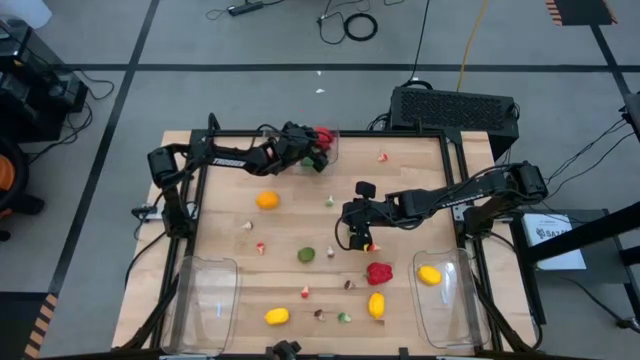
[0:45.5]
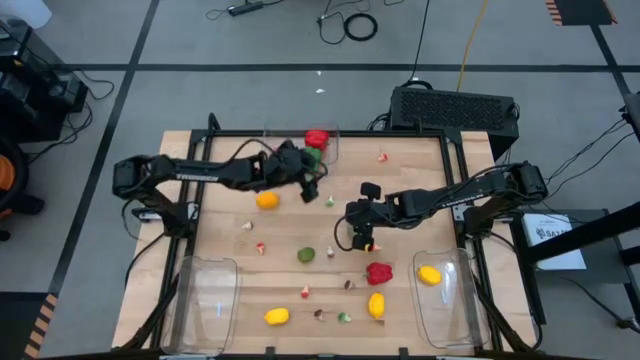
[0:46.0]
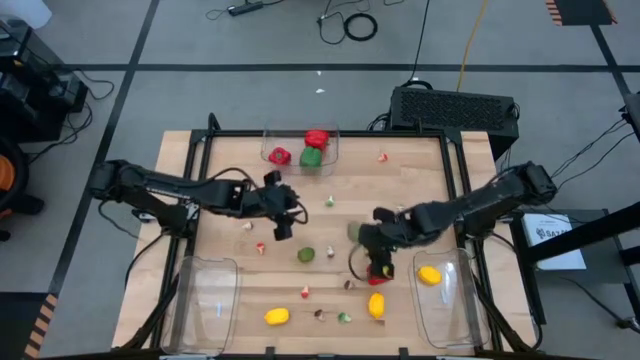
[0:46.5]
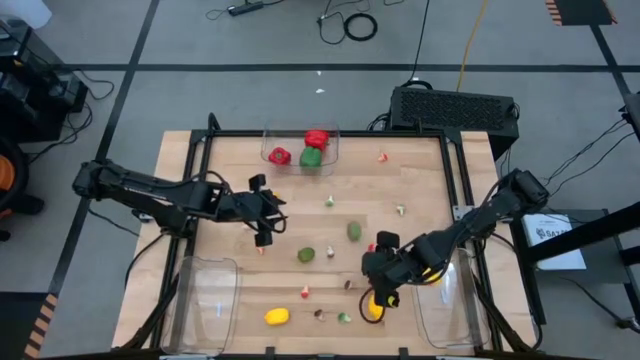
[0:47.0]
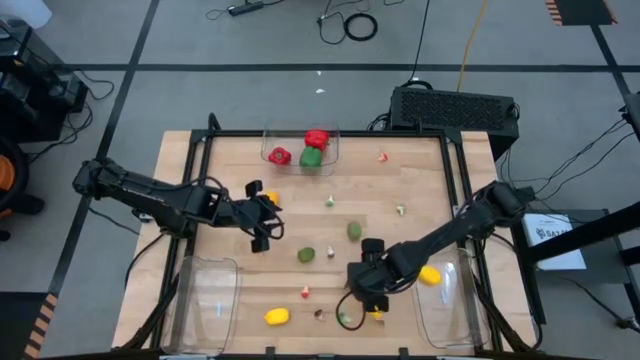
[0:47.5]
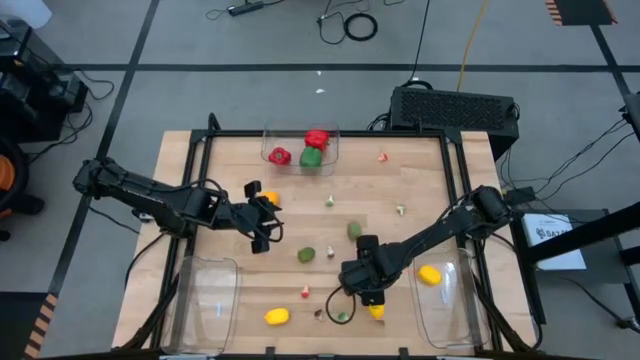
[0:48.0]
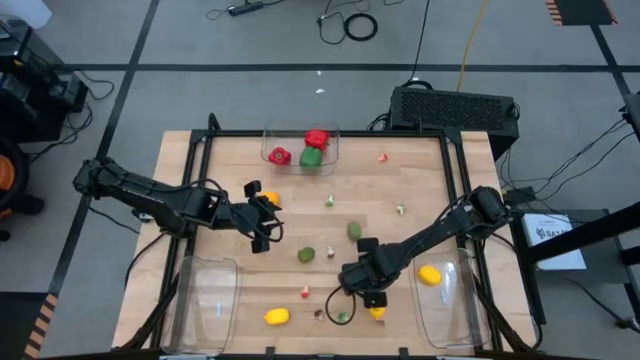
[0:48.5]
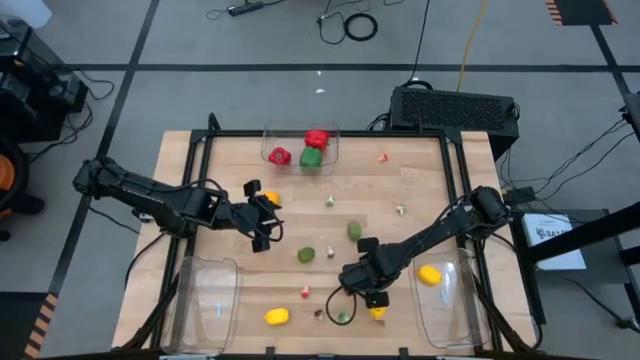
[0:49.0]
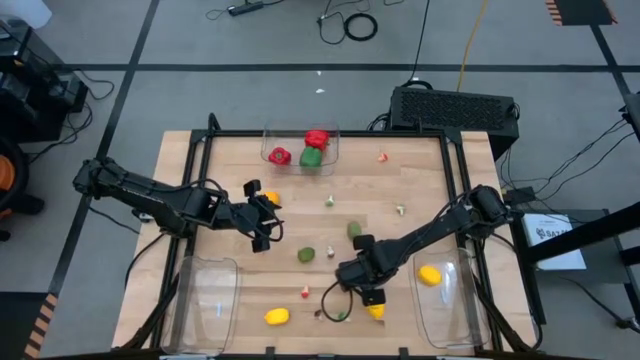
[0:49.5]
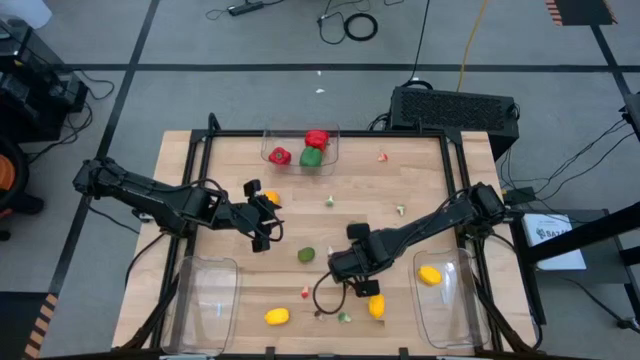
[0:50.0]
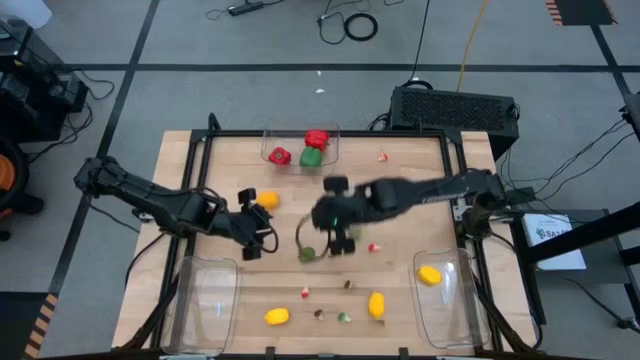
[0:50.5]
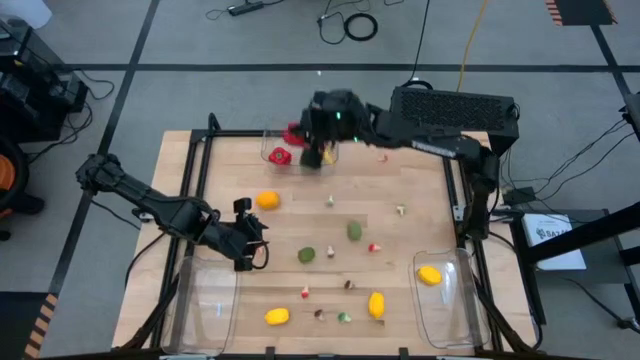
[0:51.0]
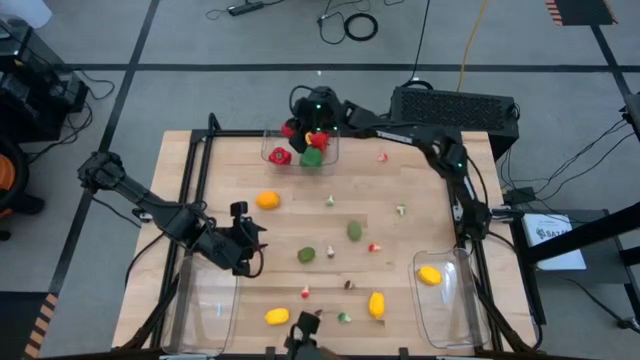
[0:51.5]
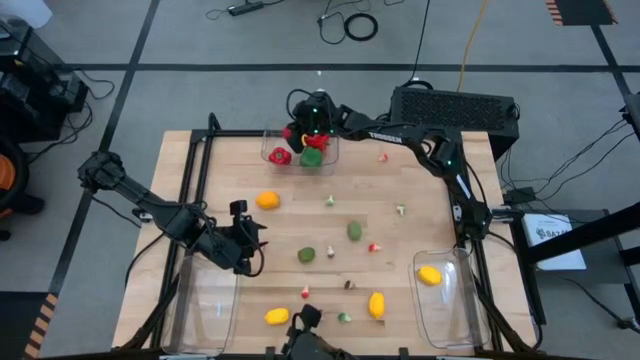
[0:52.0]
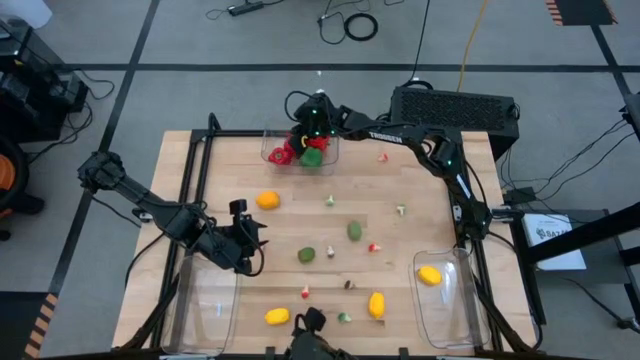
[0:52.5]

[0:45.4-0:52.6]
Task: Sort produce into baskets
Put the red bell pepper into the top transparent bin

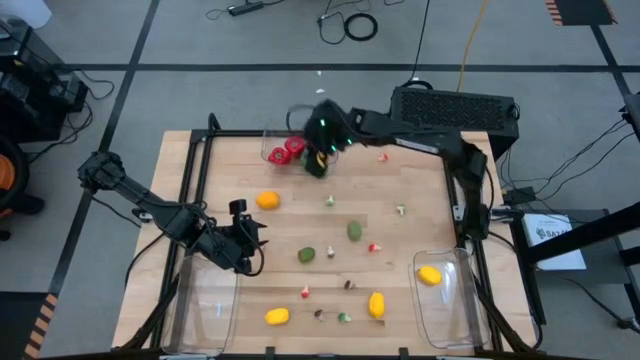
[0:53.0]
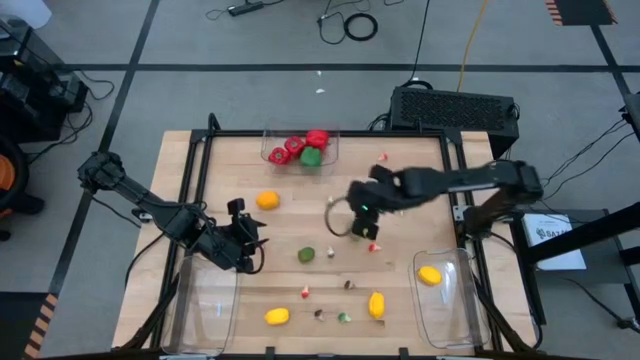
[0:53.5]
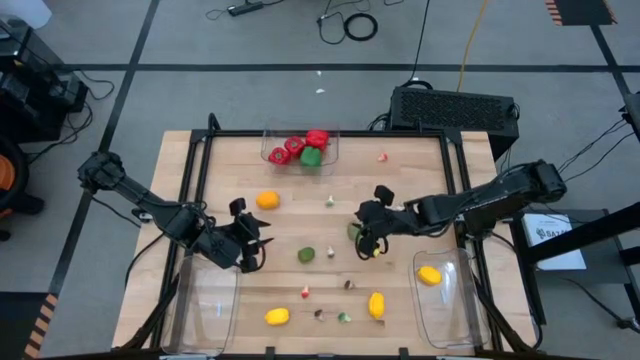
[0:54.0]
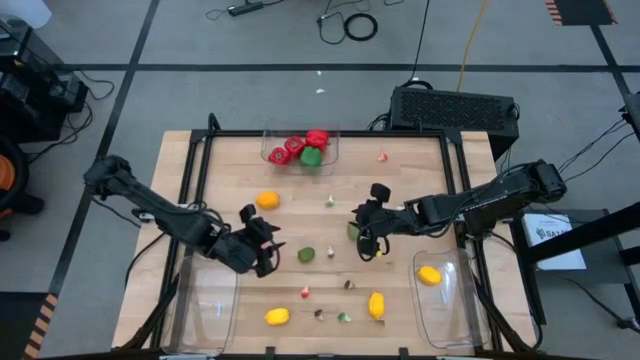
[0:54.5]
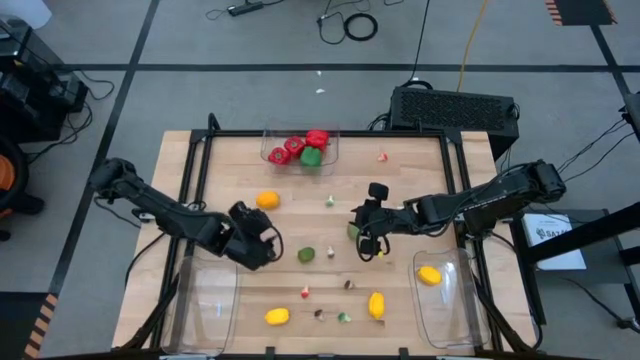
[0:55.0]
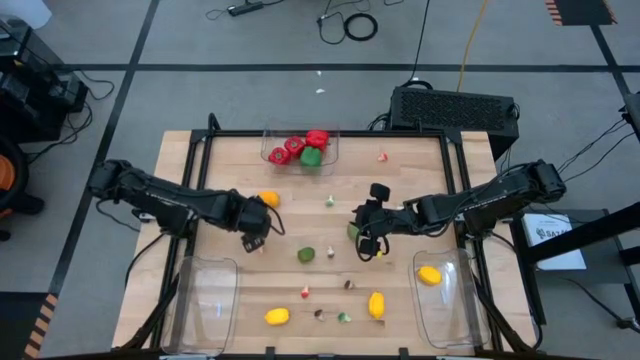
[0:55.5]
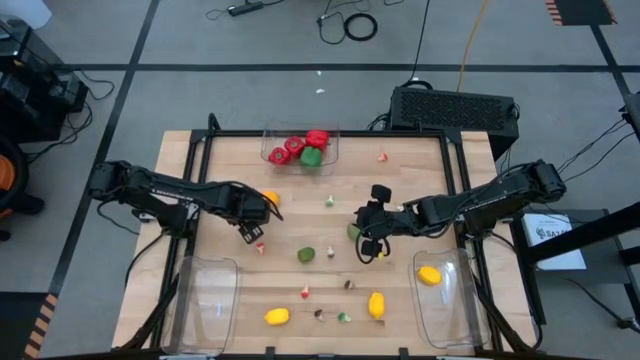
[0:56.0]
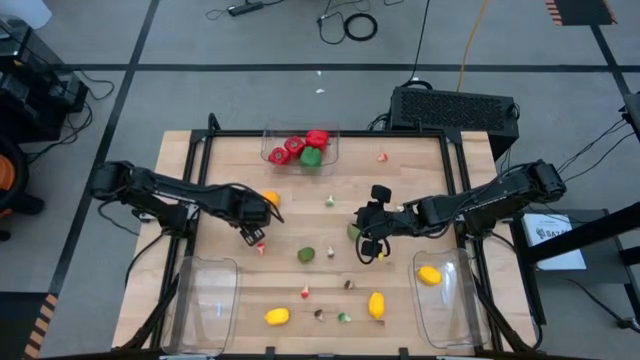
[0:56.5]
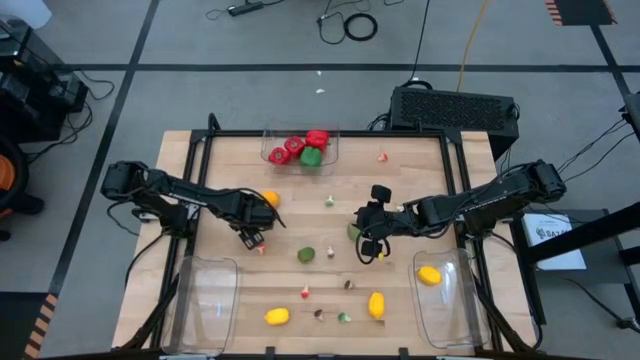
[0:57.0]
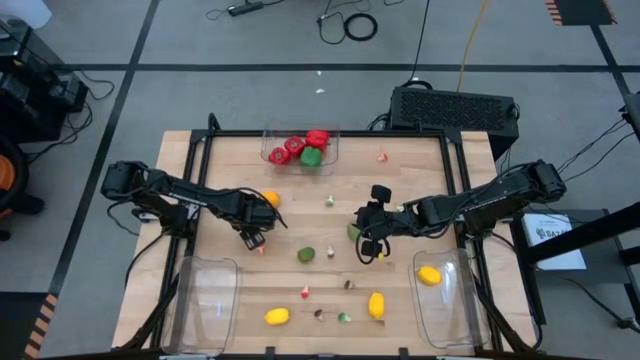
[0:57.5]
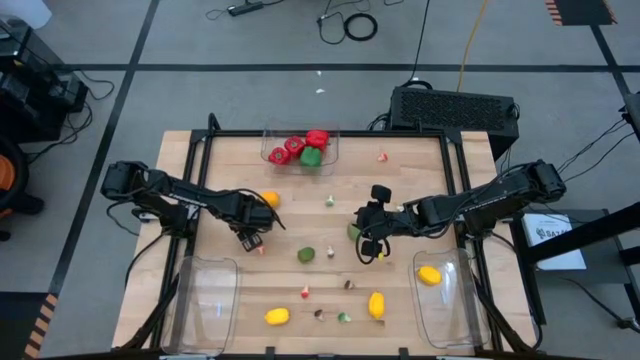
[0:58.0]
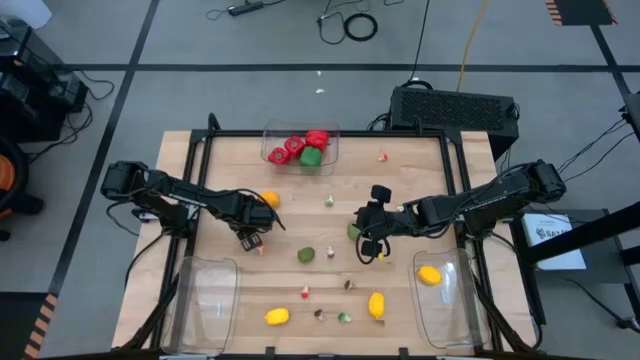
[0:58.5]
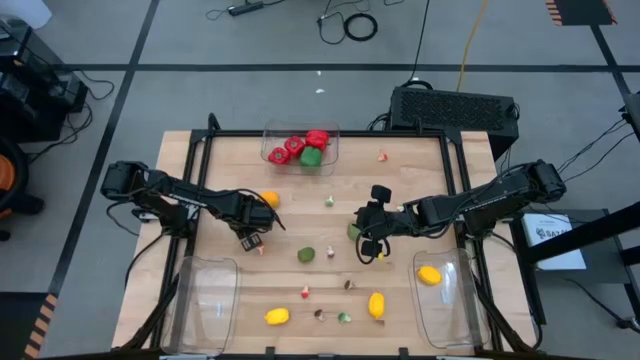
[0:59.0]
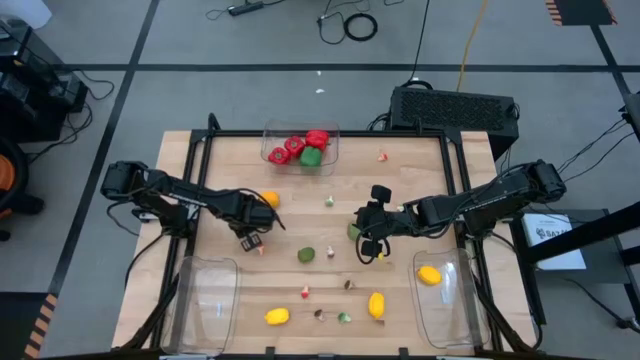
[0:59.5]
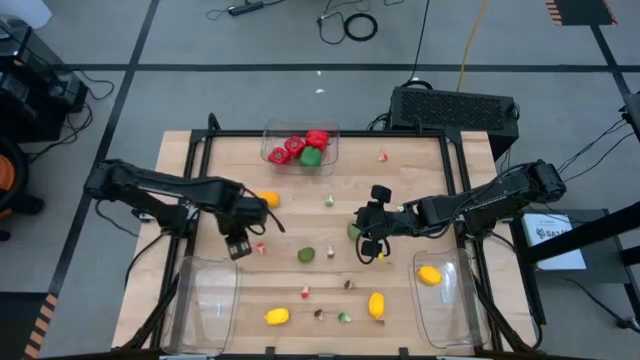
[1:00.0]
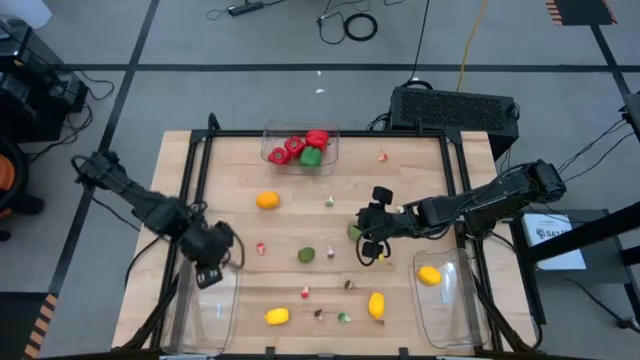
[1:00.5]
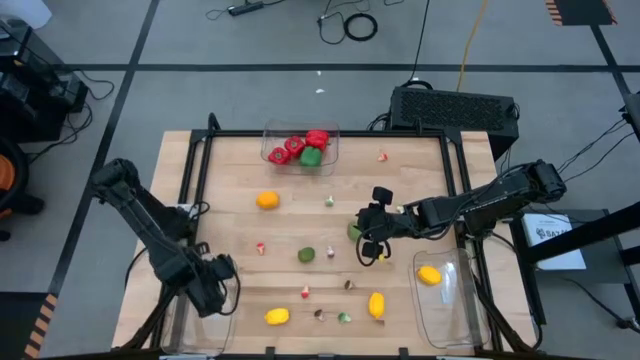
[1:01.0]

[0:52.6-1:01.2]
Put the brown mushroom into the bottom left transparent bin

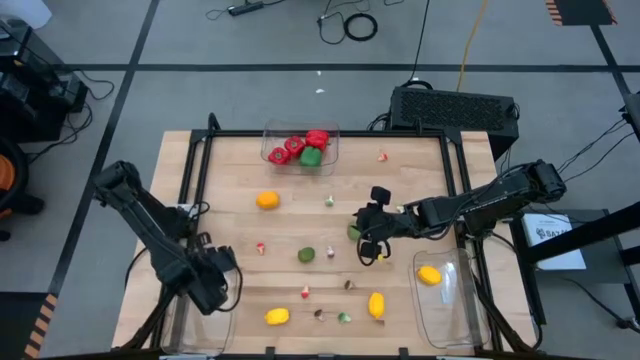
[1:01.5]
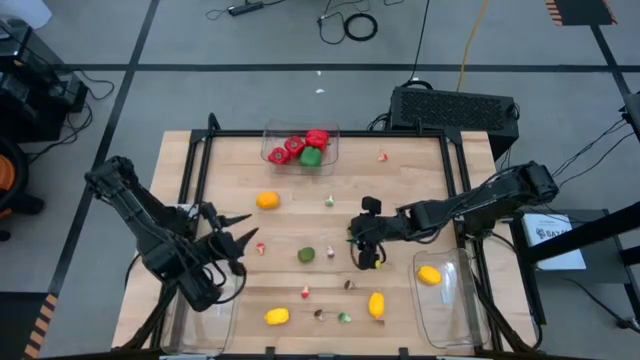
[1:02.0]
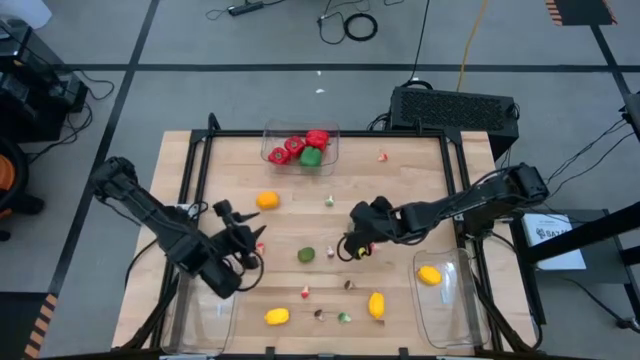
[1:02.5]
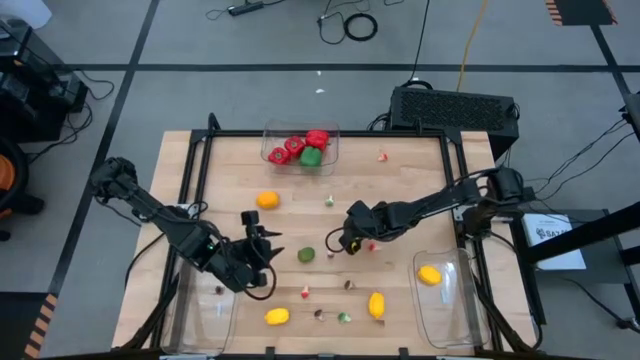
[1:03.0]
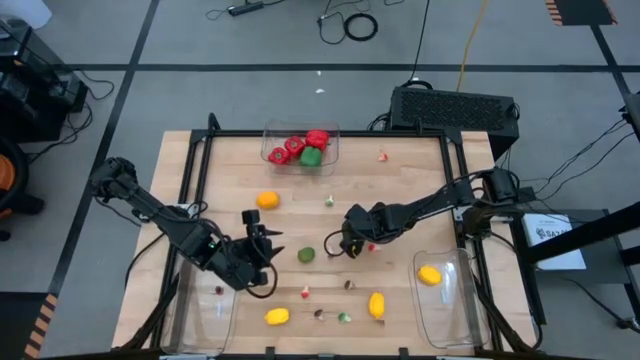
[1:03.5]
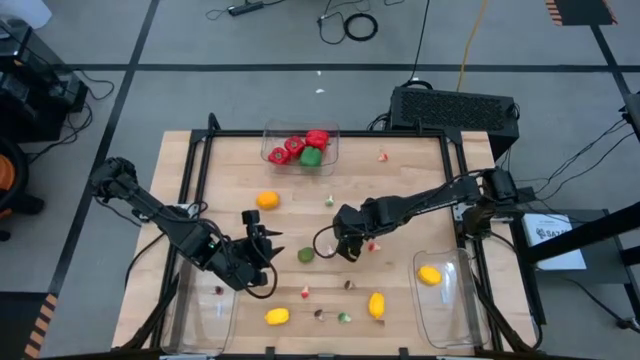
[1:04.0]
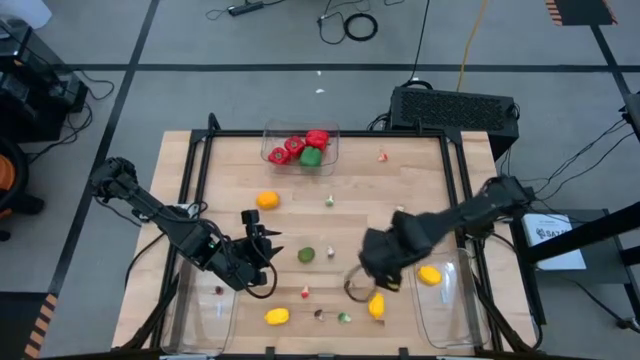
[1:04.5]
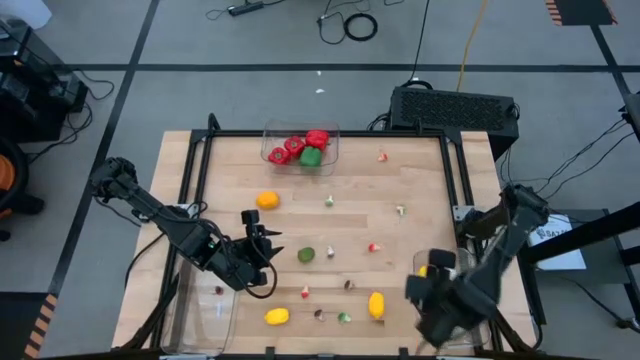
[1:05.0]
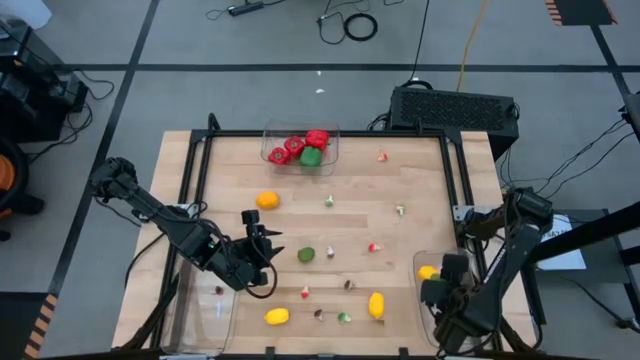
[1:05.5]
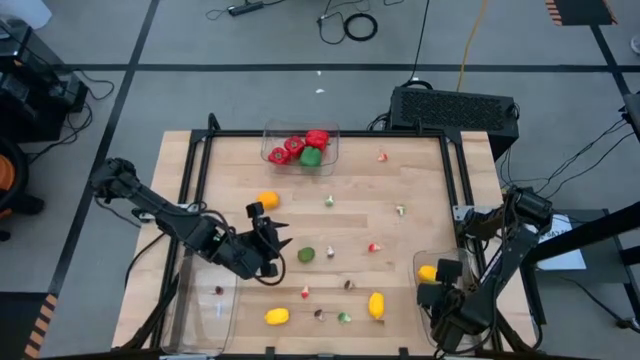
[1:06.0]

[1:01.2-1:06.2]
Put the green lime into the bottom right transparent bin

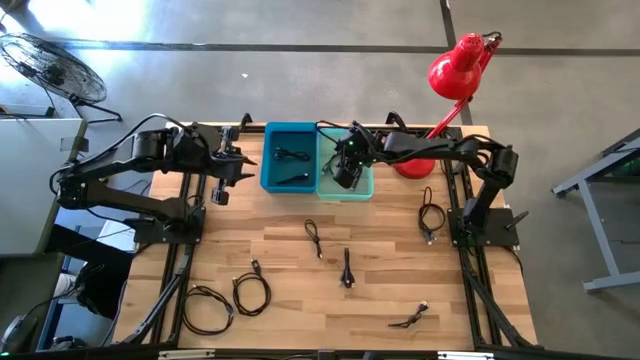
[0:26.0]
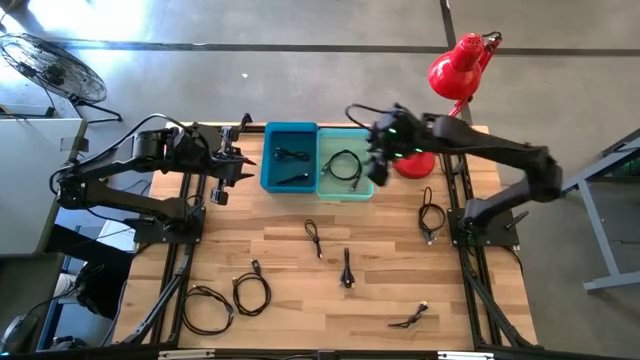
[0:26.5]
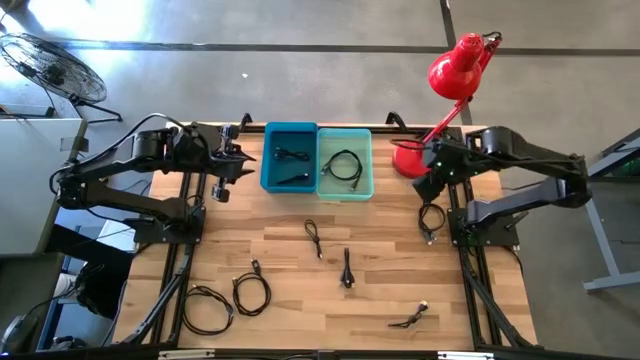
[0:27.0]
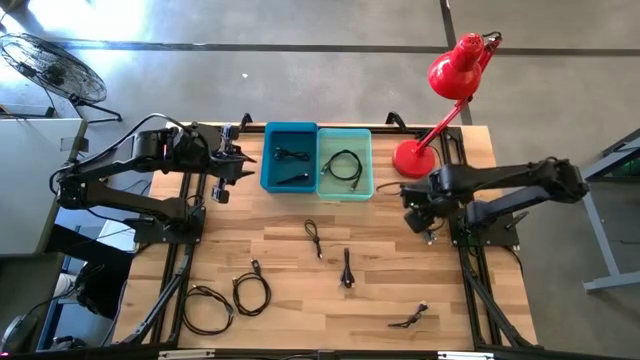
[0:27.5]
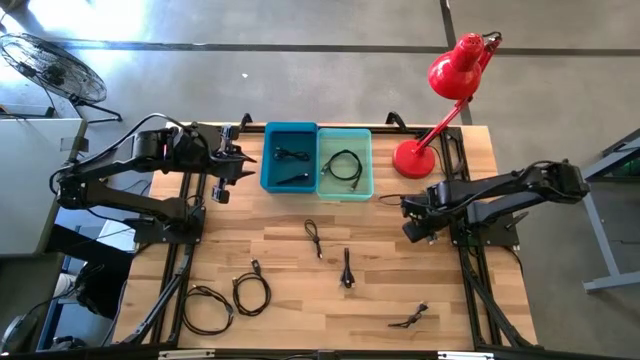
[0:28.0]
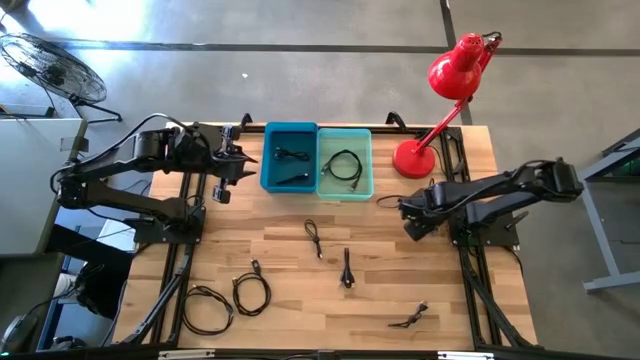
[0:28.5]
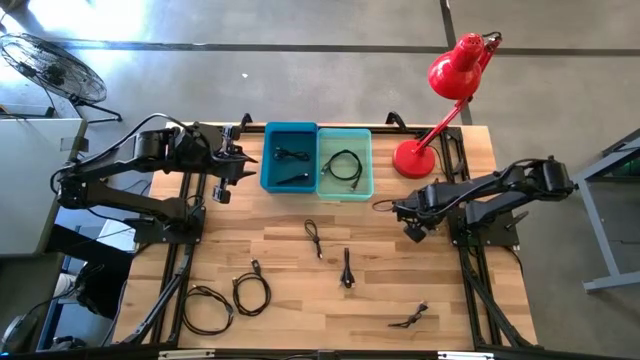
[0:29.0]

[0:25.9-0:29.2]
Task: Pick & Place USB Port
Put the black USB cable into the green bin
